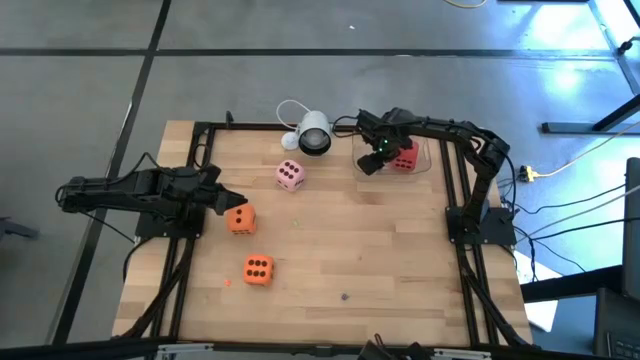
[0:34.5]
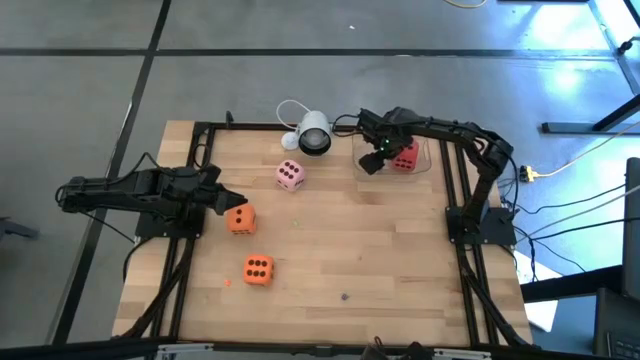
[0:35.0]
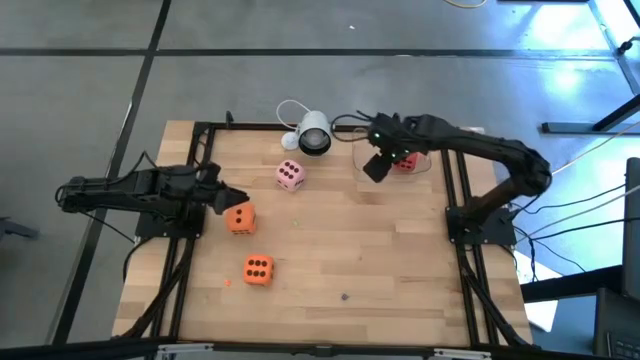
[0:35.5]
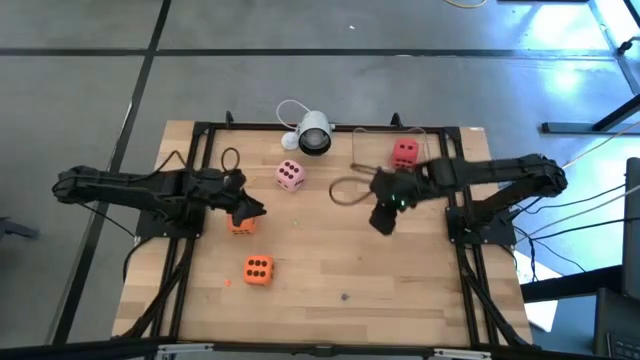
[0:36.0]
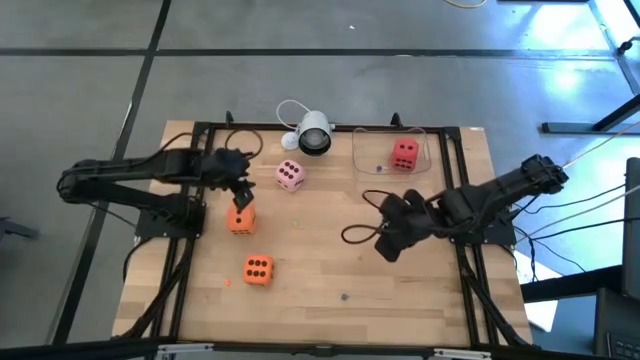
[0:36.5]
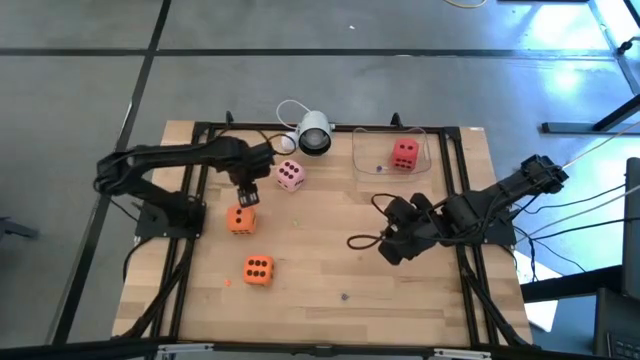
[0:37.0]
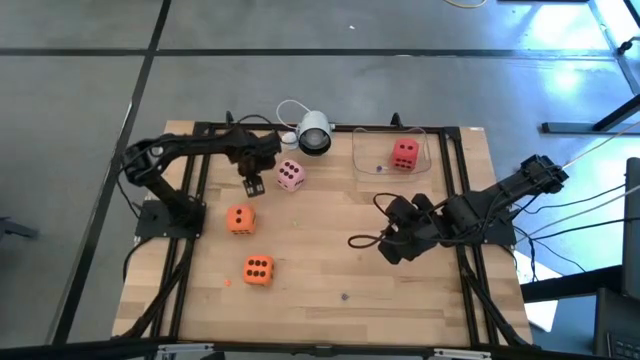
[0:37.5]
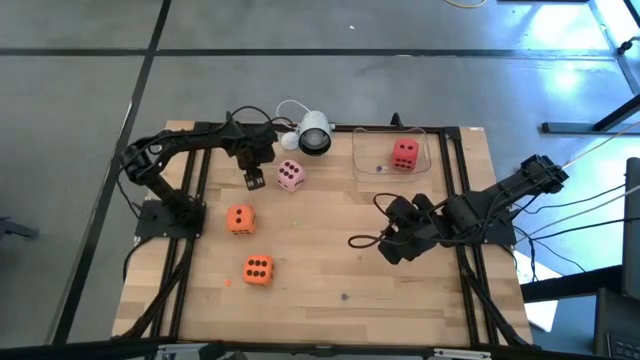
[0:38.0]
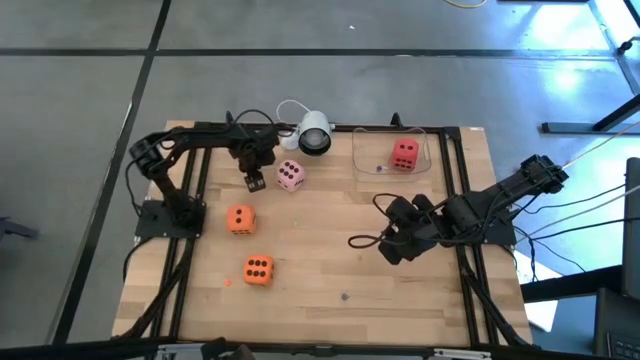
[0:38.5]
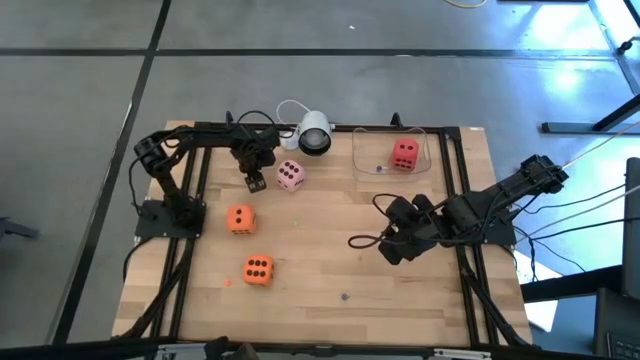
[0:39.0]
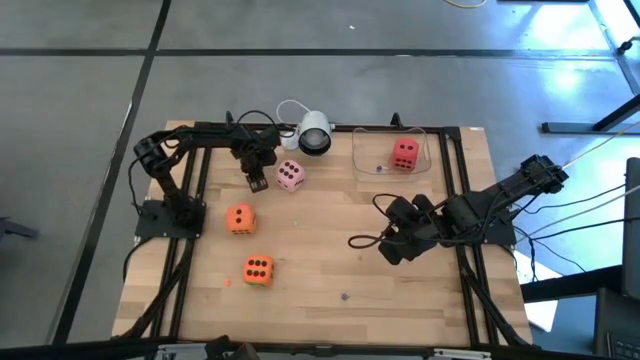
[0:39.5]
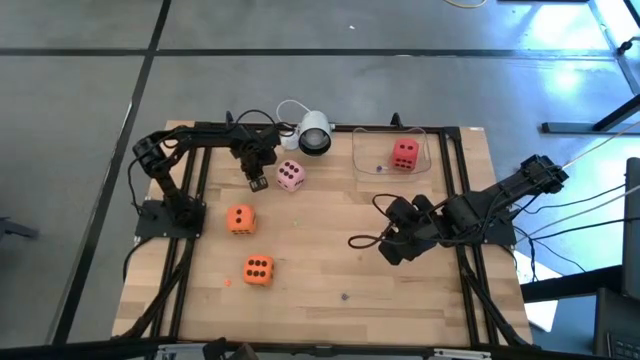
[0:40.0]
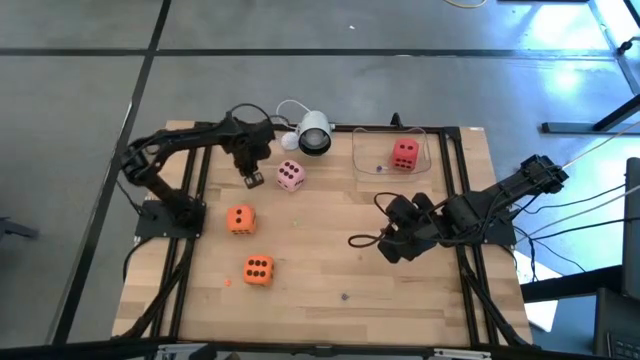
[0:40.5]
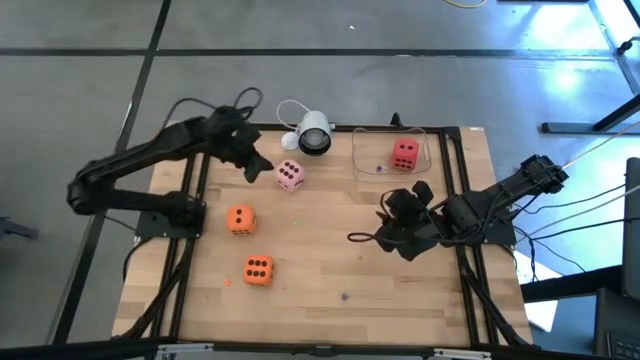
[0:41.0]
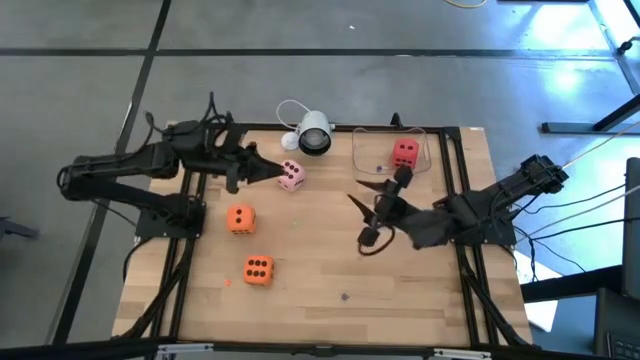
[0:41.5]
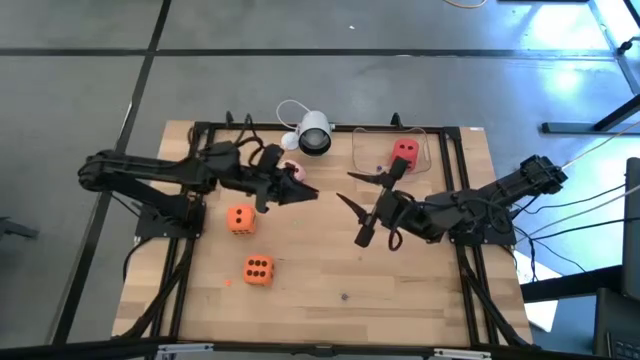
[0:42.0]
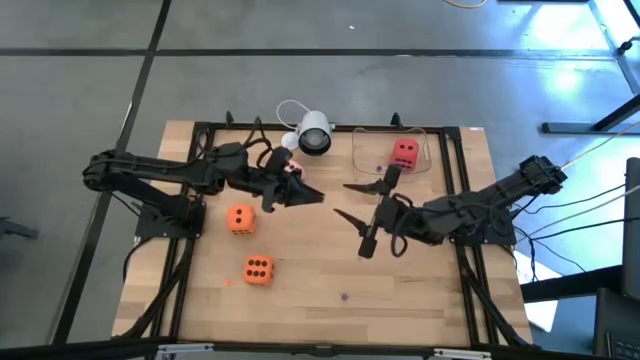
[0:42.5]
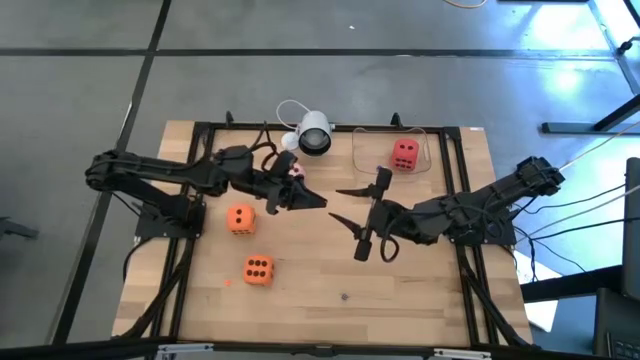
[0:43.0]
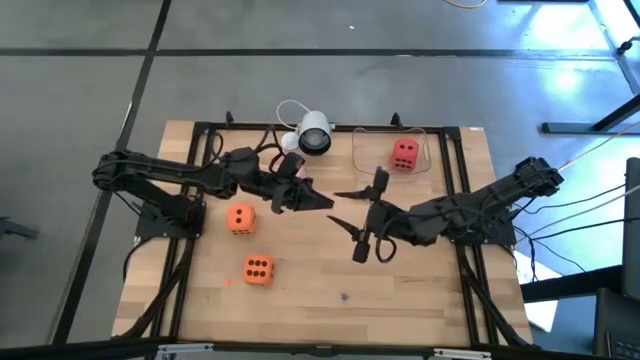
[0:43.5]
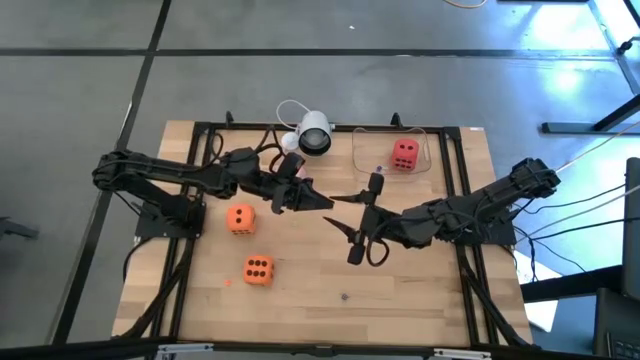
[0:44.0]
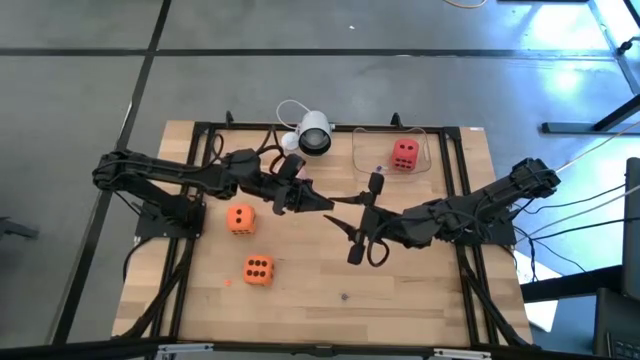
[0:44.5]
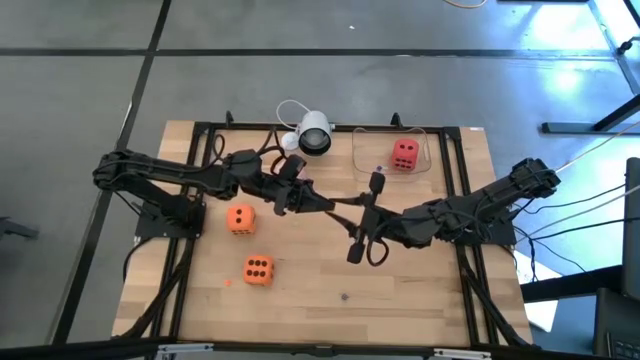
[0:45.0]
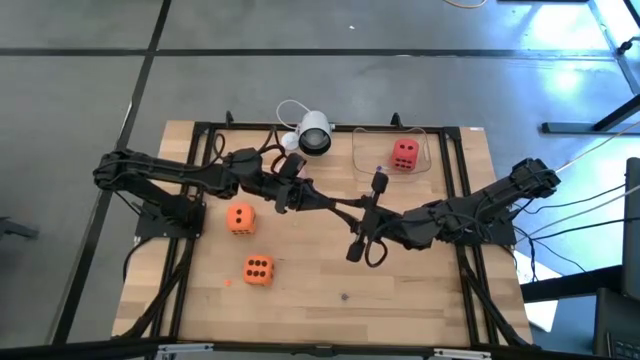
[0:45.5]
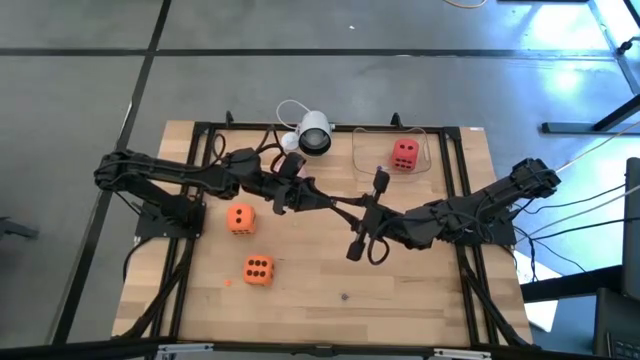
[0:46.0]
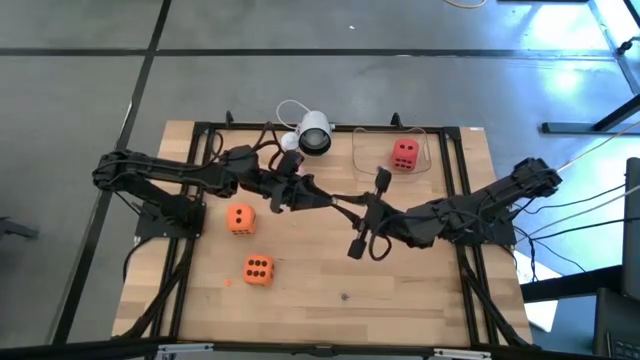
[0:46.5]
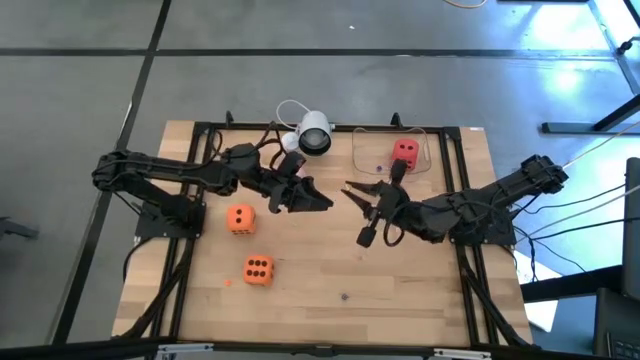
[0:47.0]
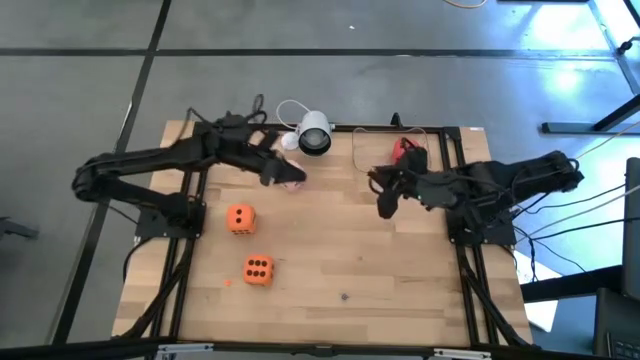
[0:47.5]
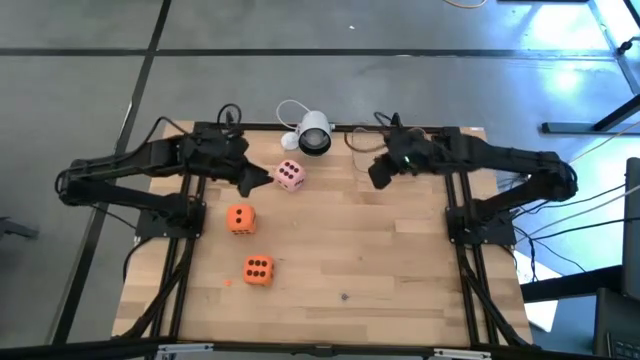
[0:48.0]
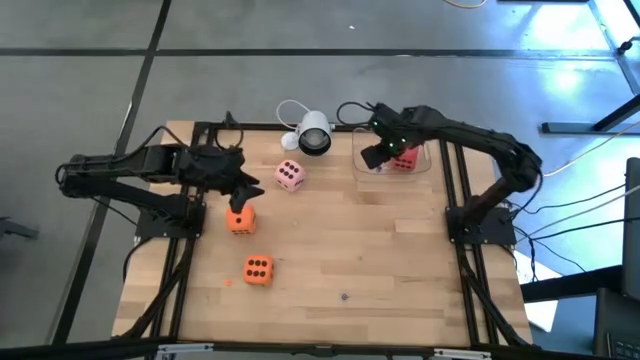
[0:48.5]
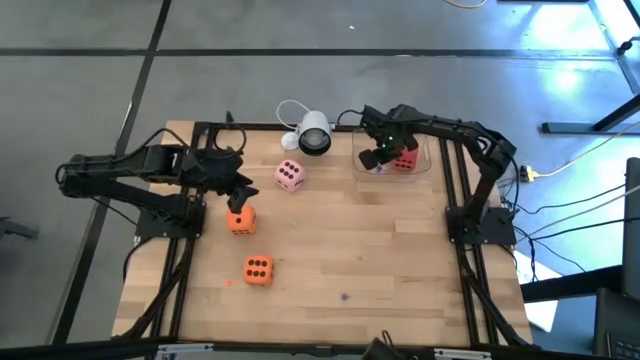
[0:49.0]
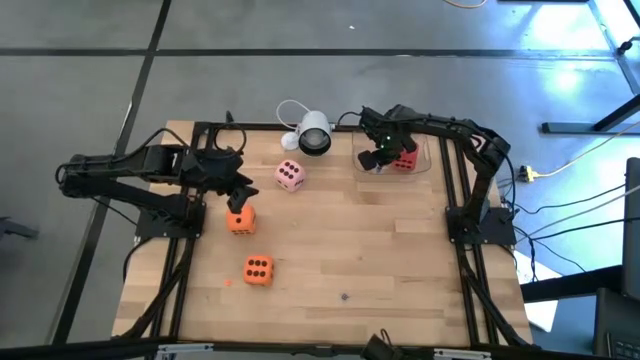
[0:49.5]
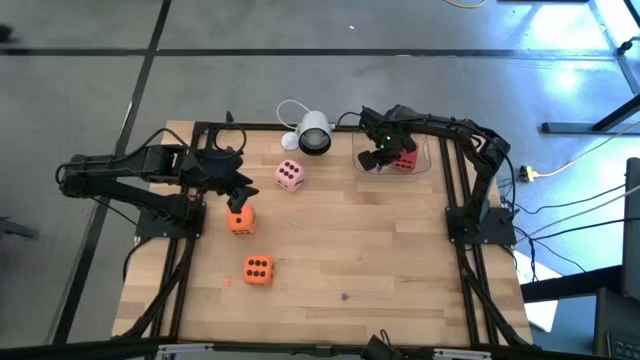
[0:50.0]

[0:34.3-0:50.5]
Task: Pick & Place Dice
Put the small yellow dice into the transparent container

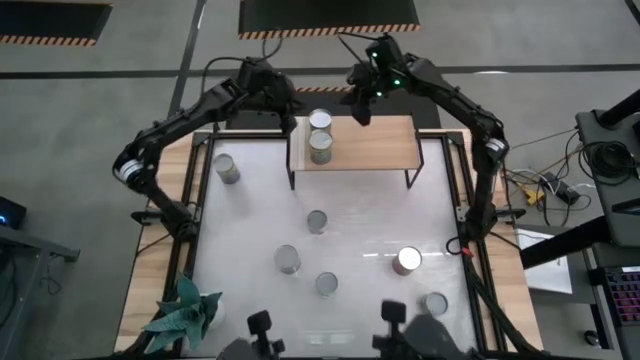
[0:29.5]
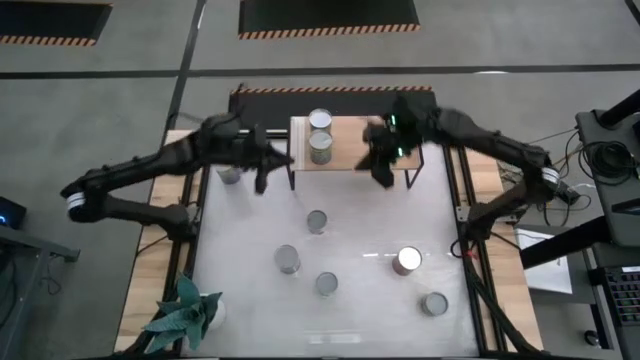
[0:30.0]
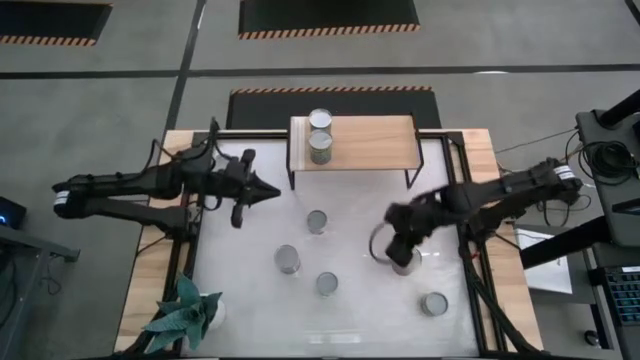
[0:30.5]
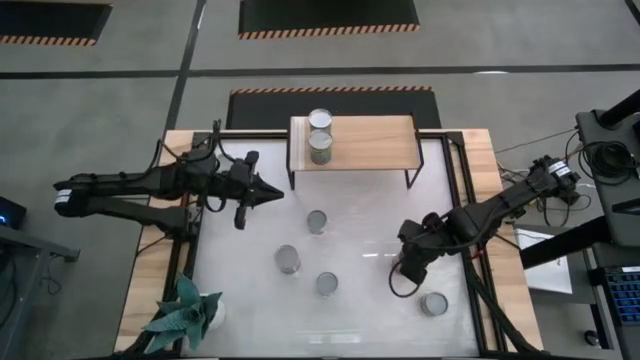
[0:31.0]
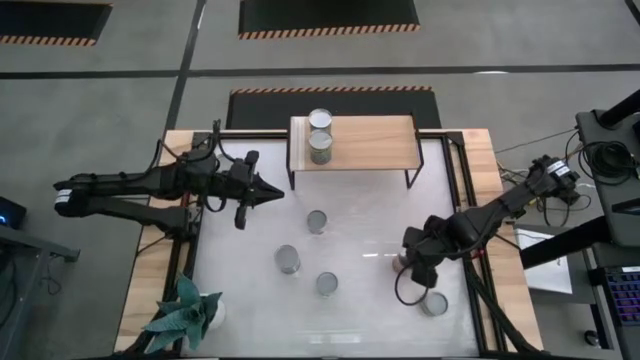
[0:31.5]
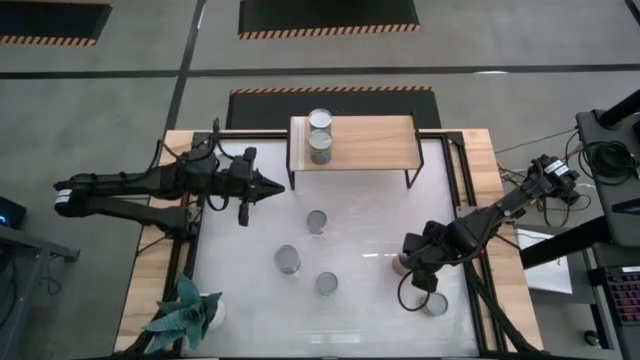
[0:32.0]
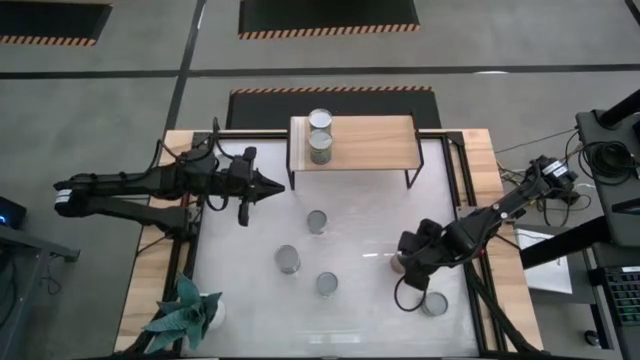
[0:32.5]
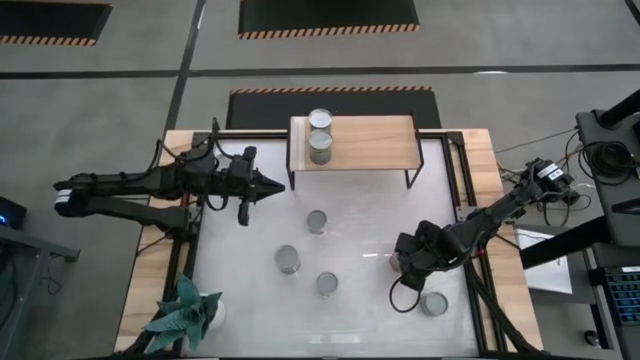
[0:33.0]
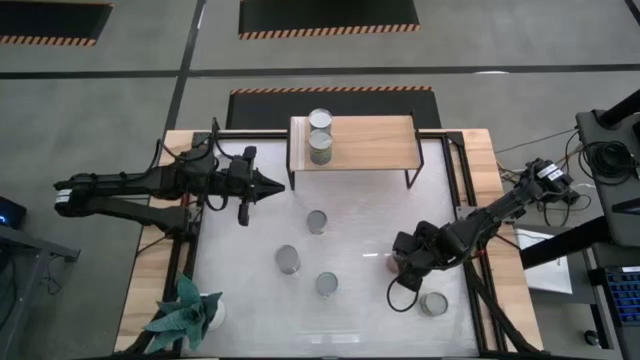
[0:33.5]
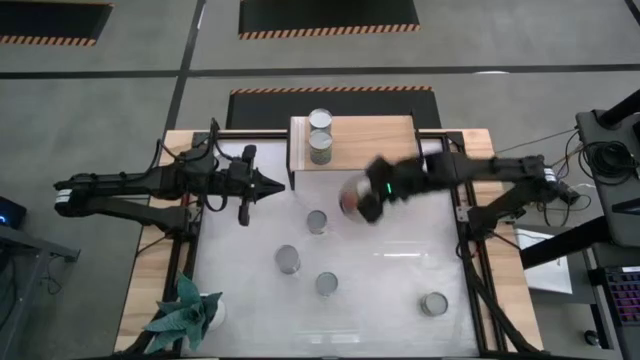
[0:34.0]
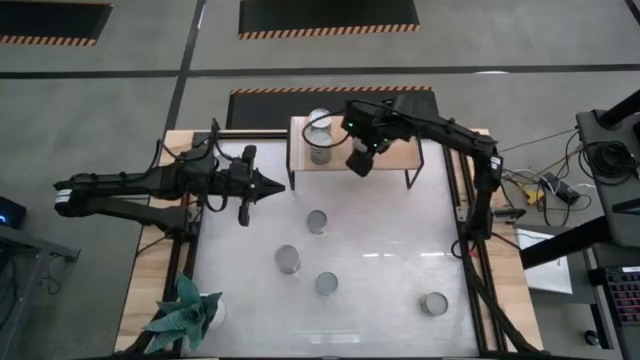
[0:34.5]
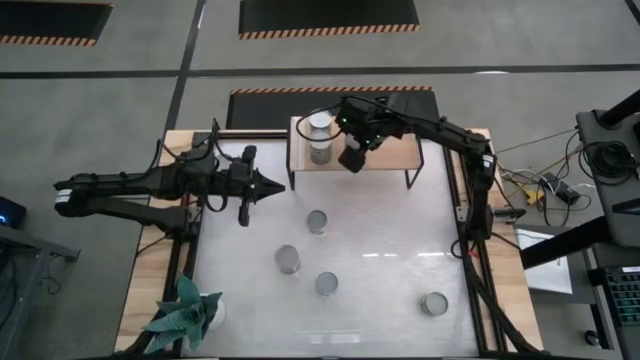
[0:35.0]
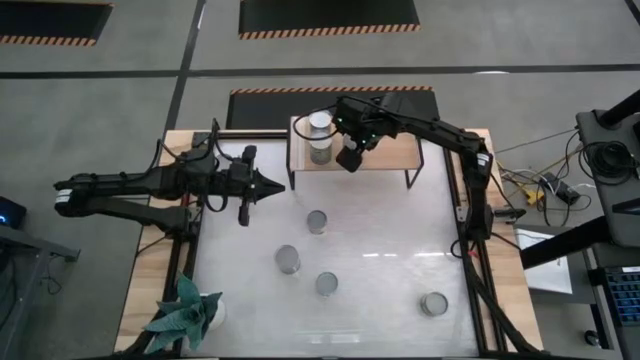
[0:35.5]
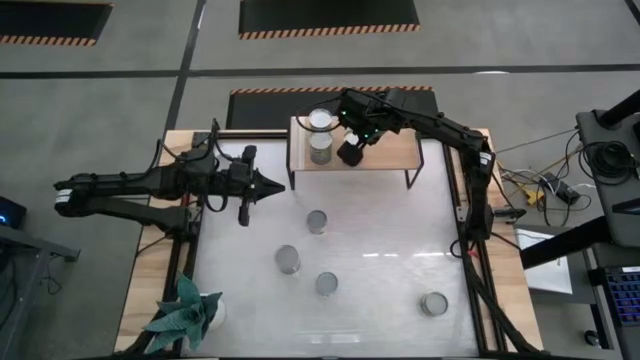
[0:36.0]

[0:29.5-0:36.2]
Task: Pick and place cans onto a shelf
Put the canned pineapple on the shelf
